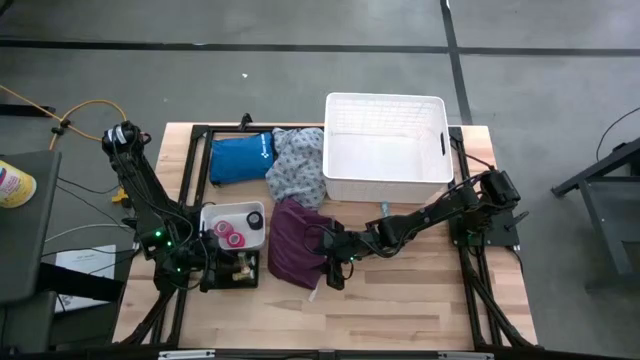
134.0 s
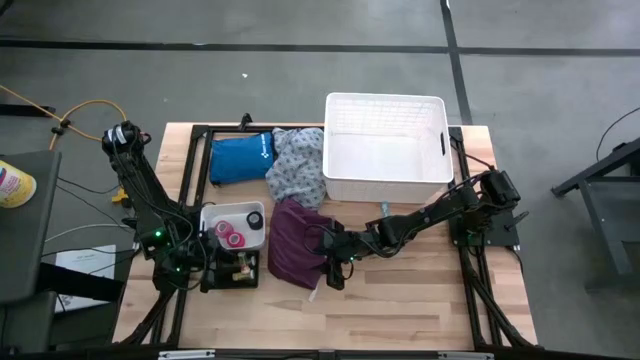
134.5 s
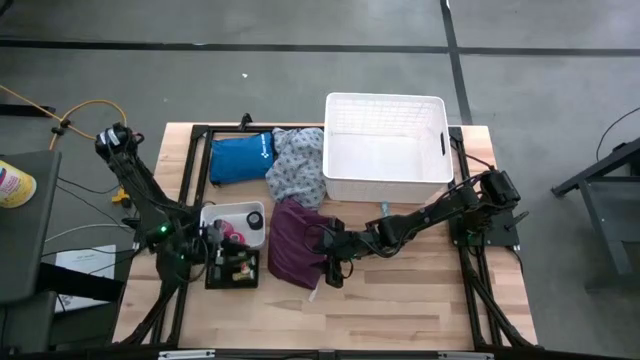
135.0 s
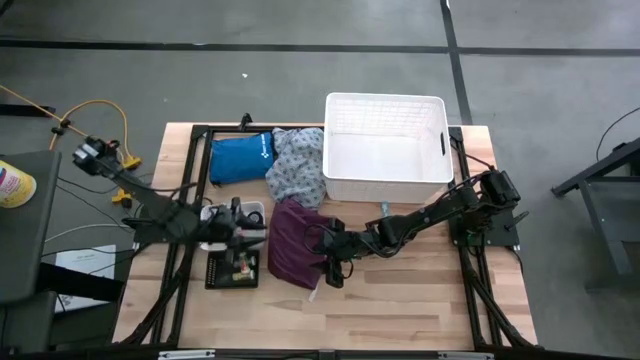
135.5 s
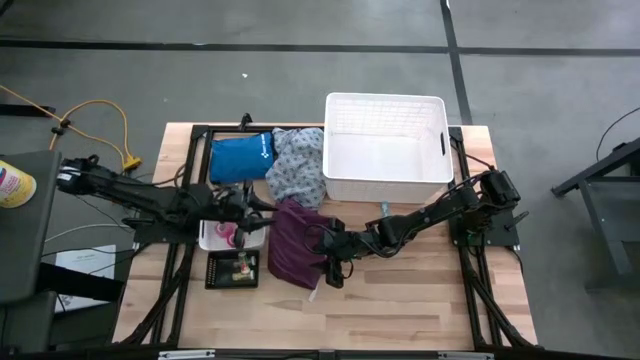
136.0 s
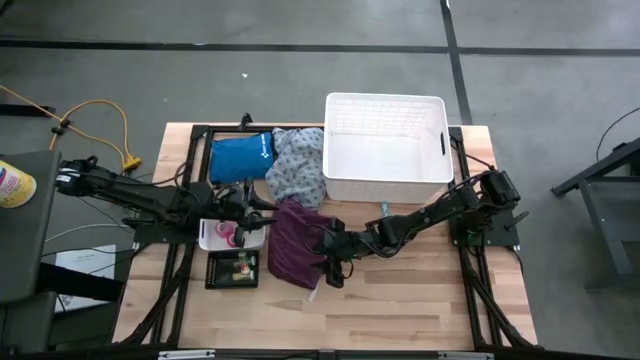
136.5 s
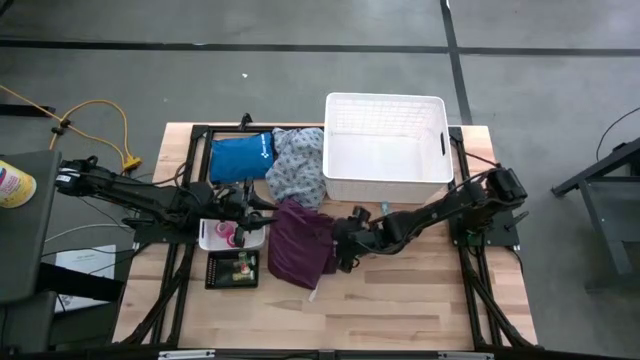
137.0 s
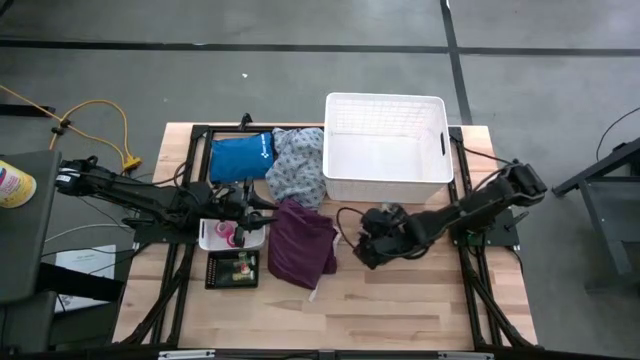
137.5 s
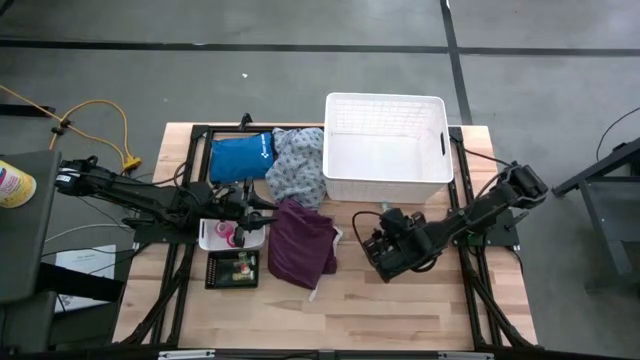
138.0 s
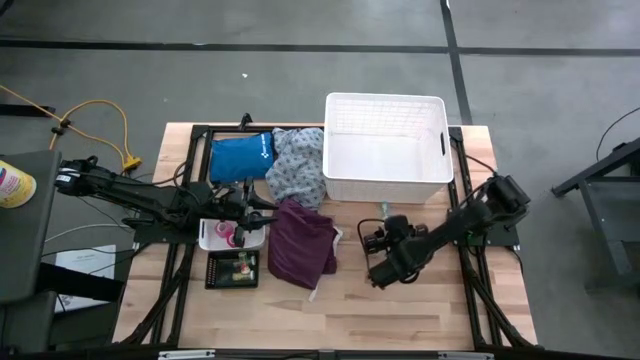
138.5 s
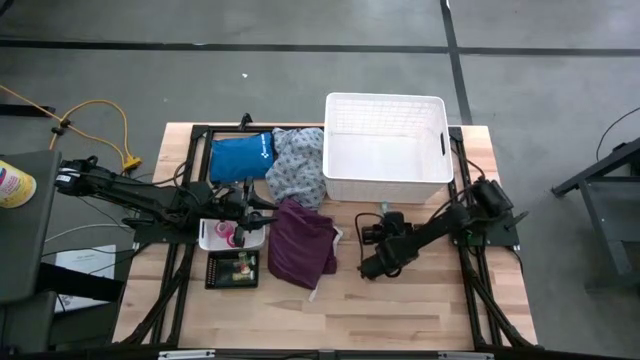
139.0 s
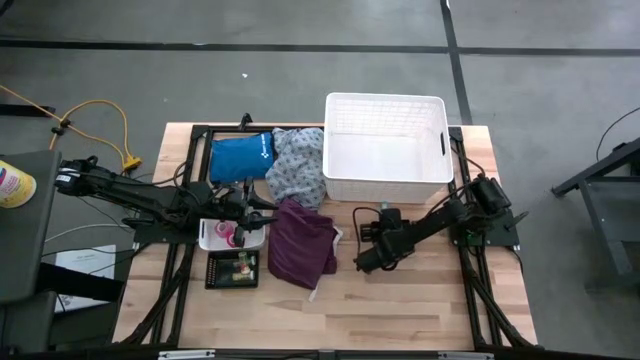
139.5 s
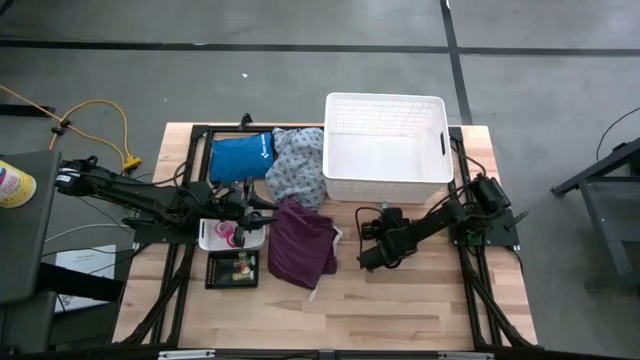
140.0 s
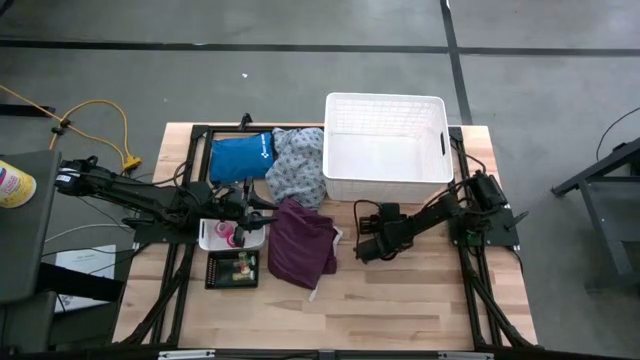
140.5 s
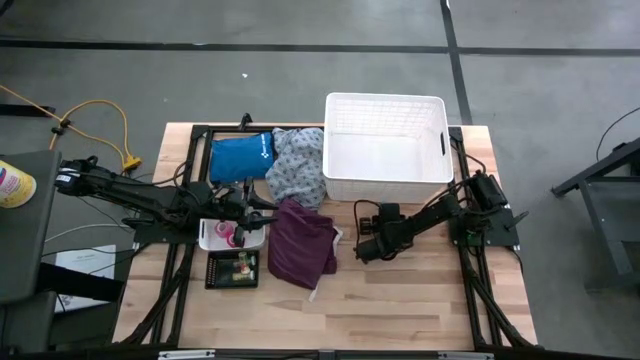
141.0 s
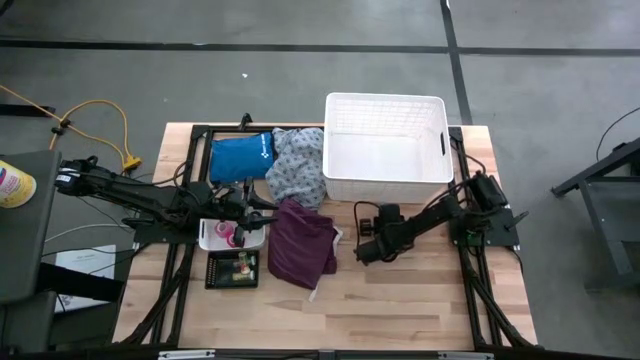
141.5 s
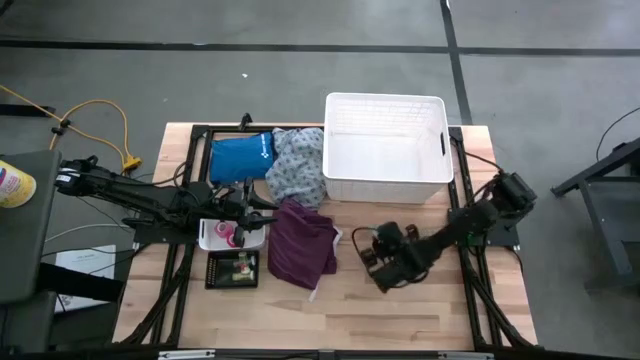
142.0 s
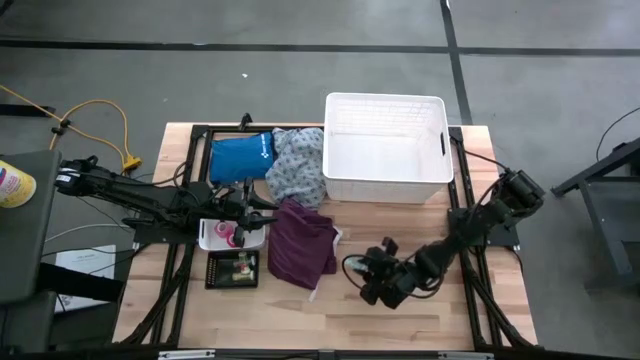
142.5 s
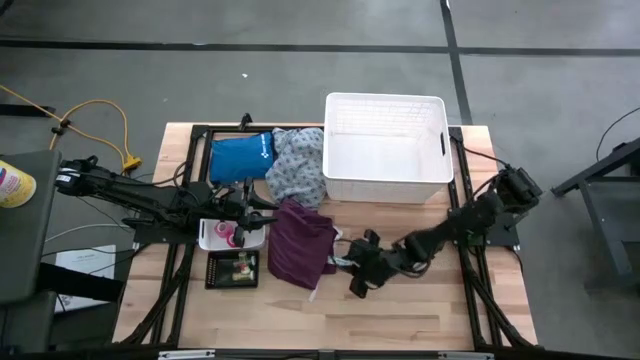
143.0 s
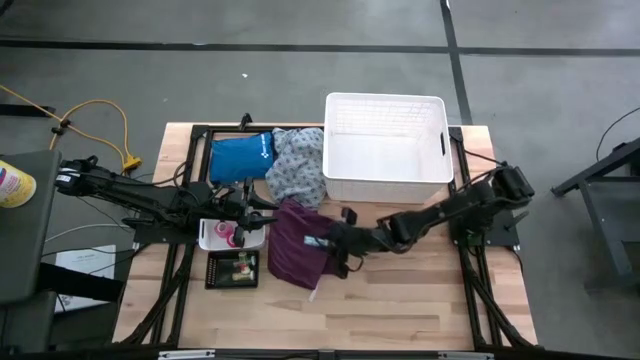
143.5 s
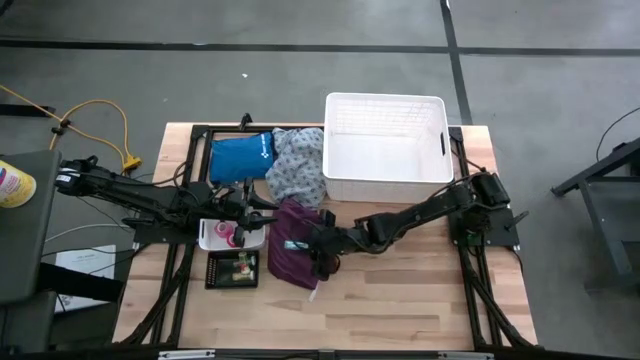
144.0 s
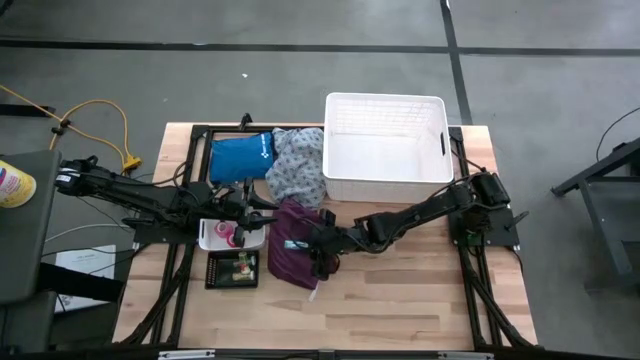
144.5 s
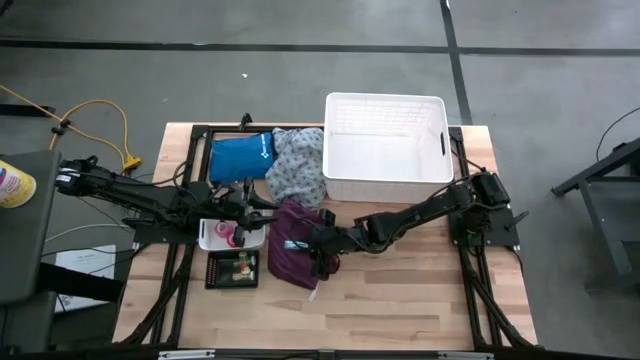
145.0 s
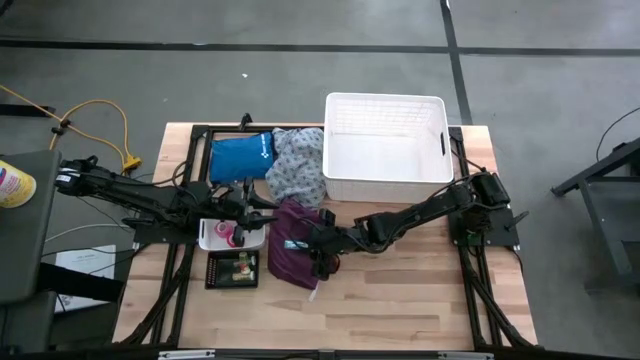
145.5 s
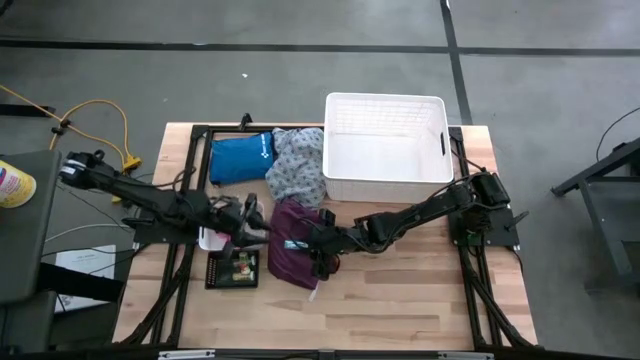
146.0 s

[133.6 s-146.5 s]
Task: Pick & place medical supplies in basket/bin
Put the blue pill bottle into the black bin

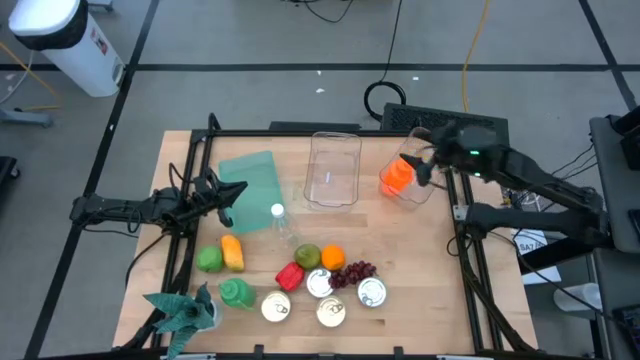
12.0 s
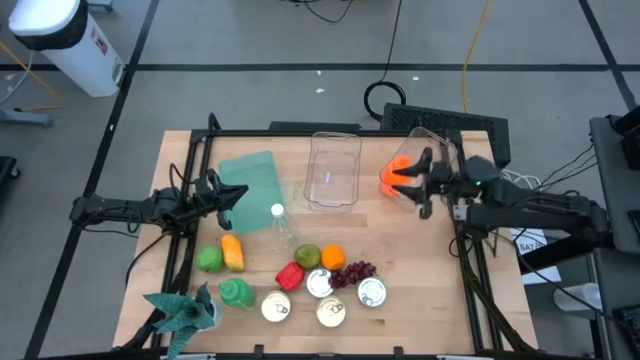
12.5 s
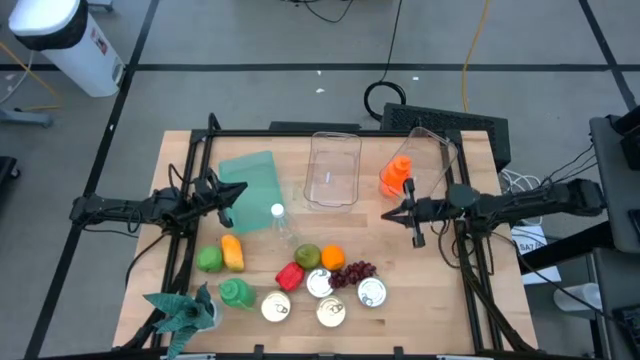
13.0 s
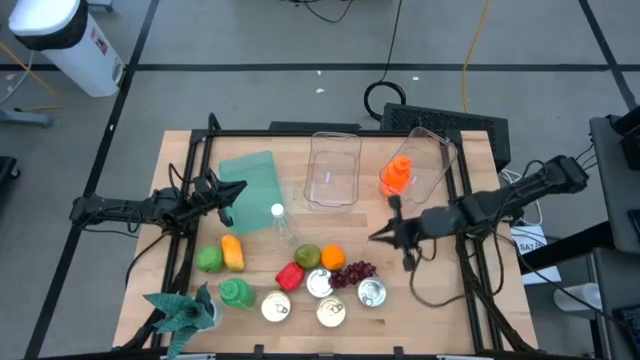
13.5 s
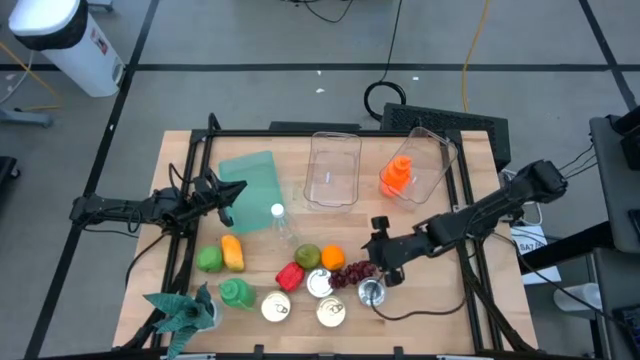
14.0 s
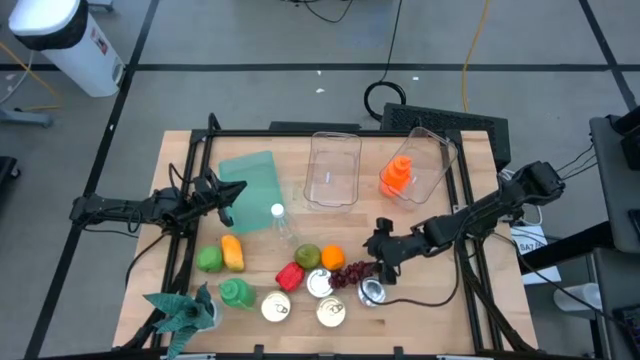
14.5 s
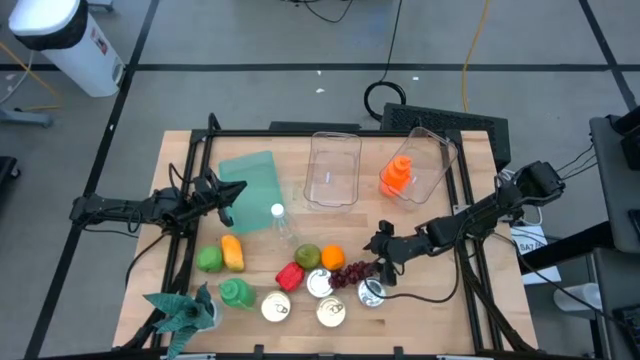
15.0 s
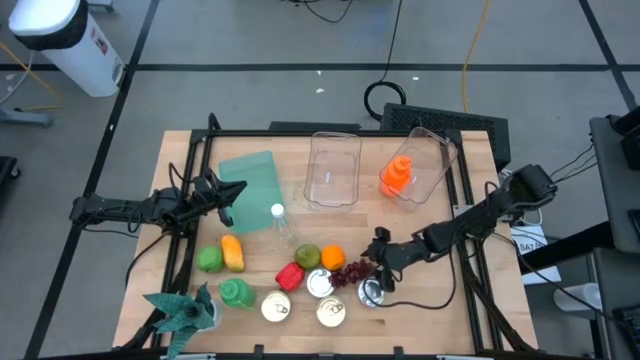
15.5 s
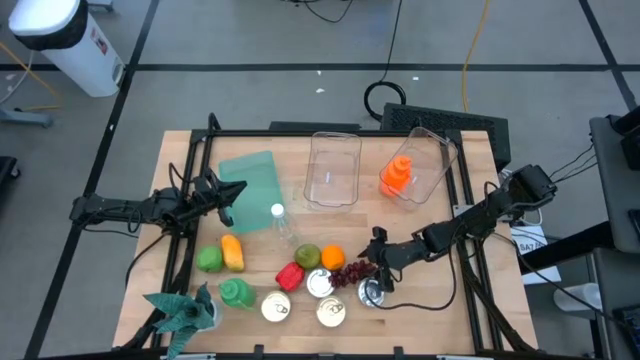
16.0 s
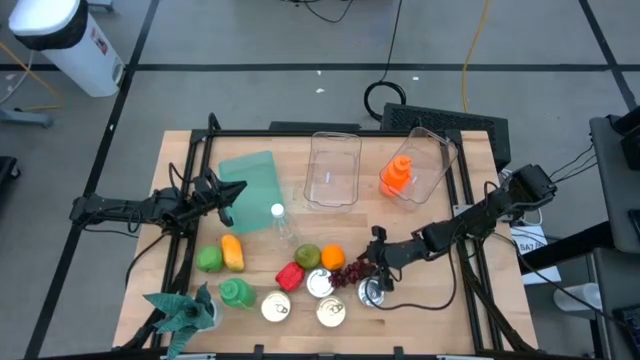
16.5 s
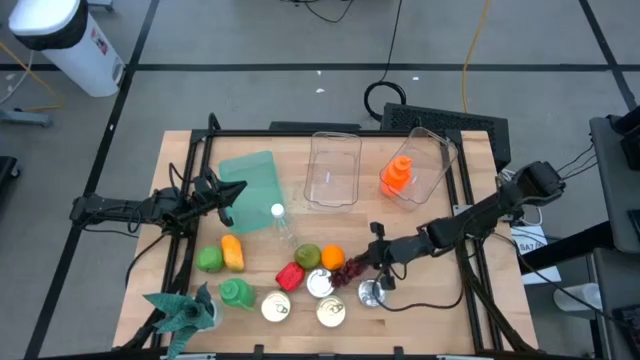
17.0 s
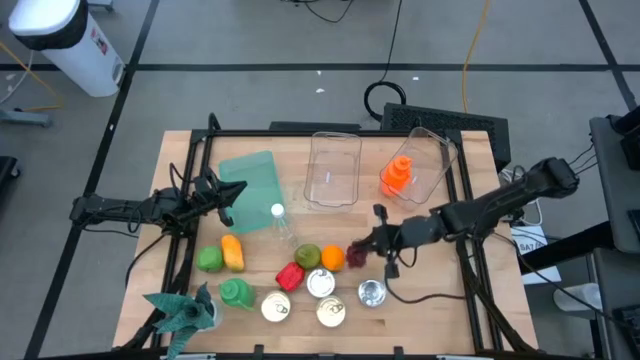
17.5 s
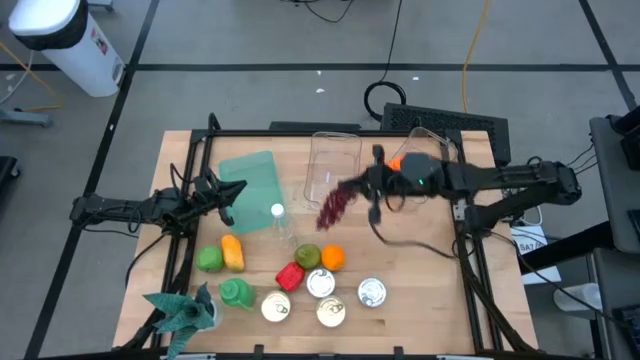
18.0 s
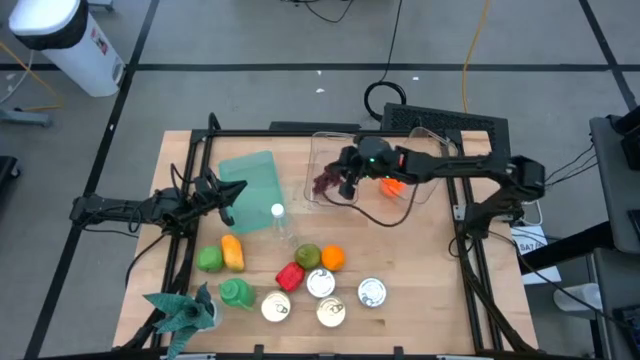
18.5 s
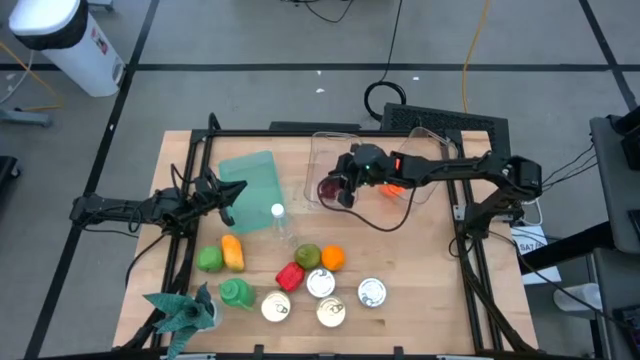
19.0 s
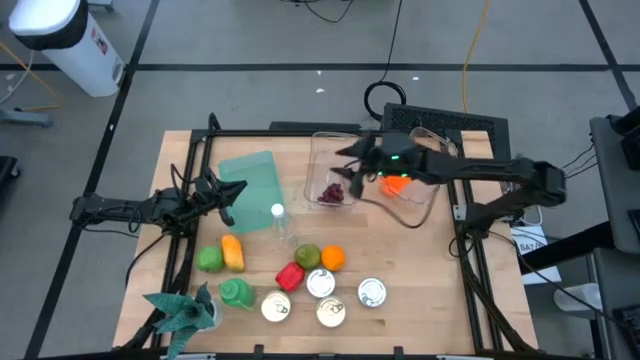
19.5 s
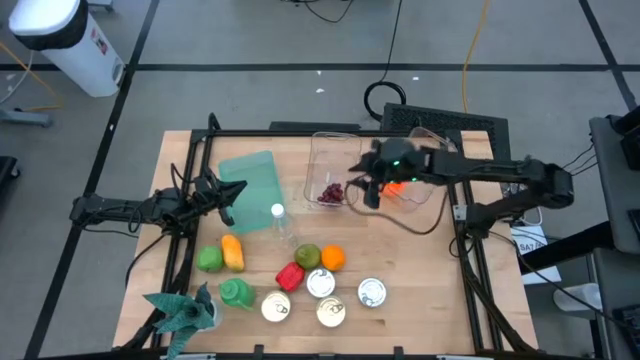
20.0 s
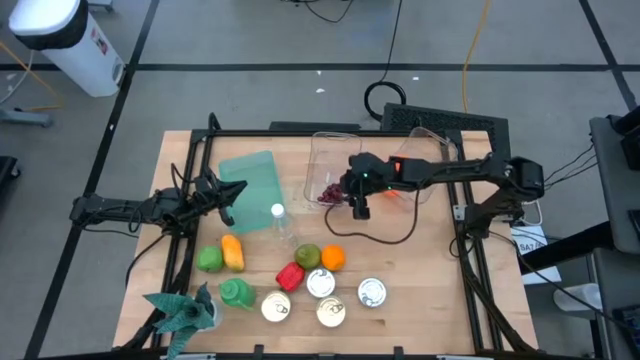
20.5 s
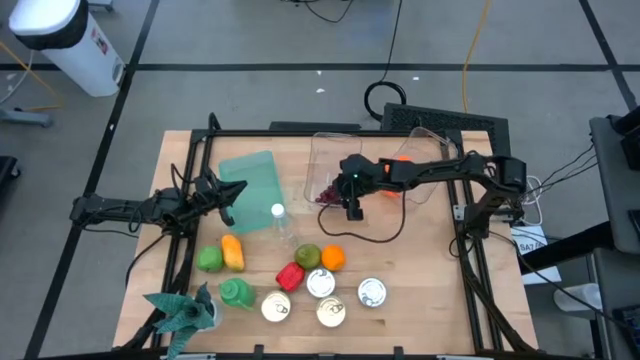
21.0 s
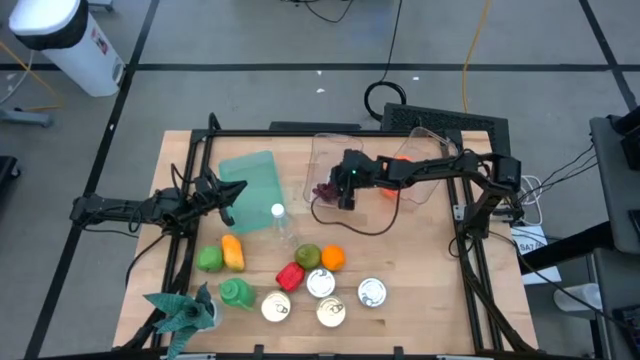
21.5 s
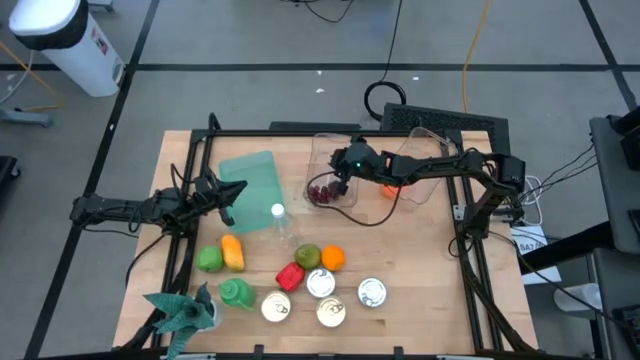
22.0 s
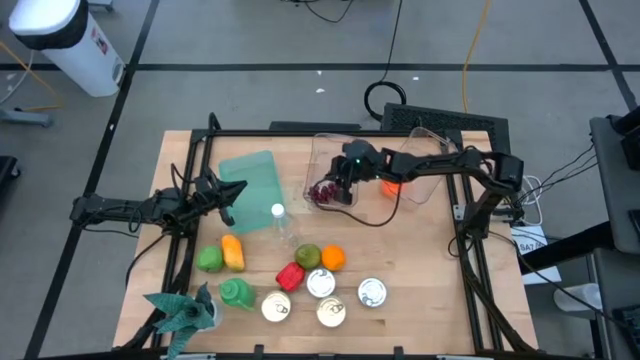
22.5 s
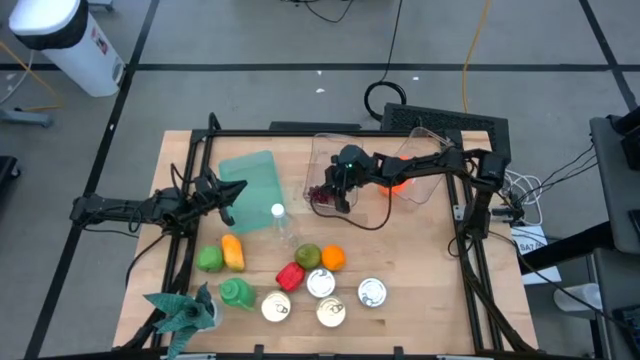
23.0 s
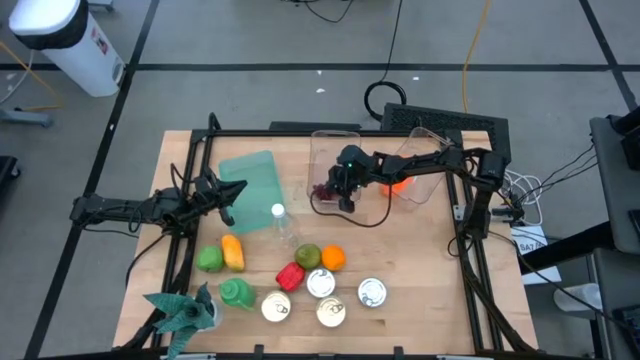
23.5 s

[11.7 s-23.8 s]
Task: Pick & Place Food Item
Put the red grapes into the left transparent bin
